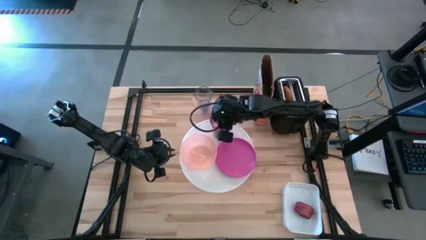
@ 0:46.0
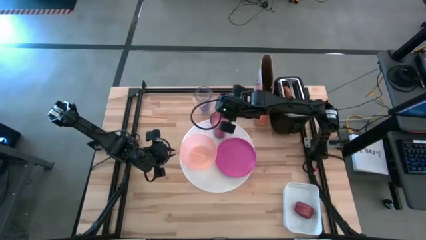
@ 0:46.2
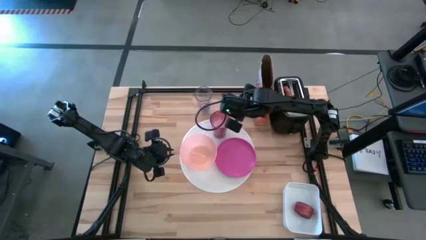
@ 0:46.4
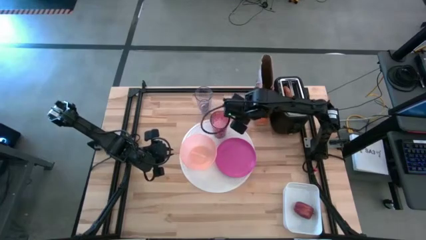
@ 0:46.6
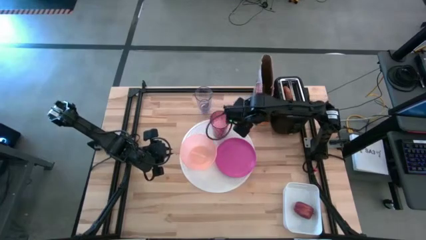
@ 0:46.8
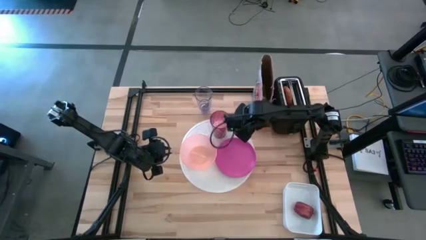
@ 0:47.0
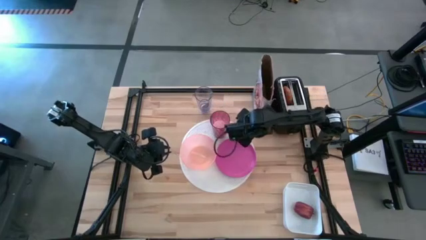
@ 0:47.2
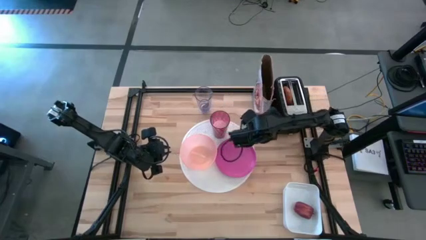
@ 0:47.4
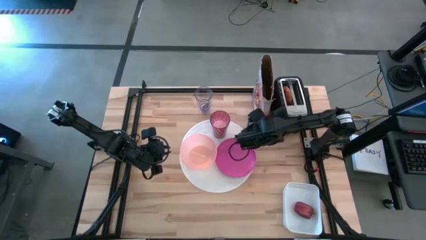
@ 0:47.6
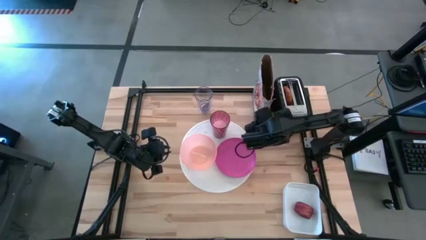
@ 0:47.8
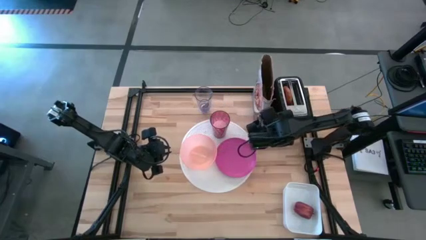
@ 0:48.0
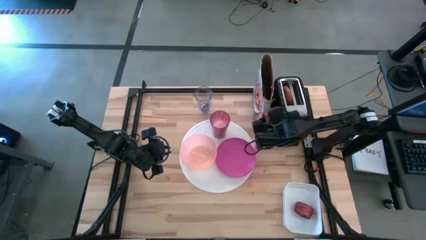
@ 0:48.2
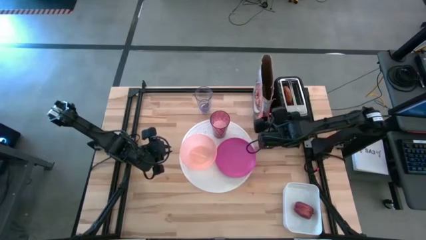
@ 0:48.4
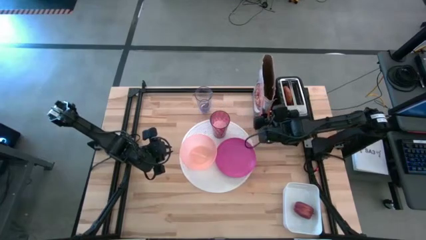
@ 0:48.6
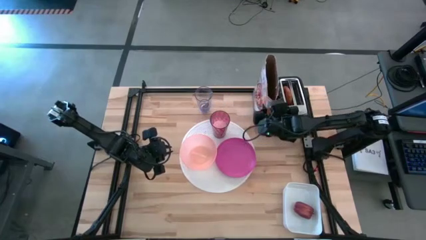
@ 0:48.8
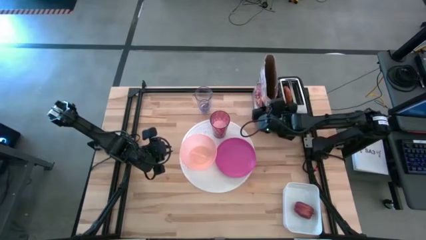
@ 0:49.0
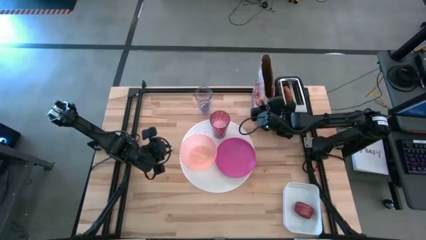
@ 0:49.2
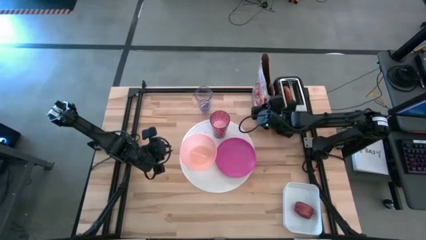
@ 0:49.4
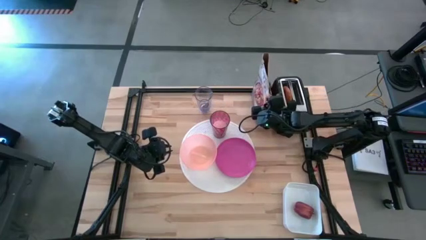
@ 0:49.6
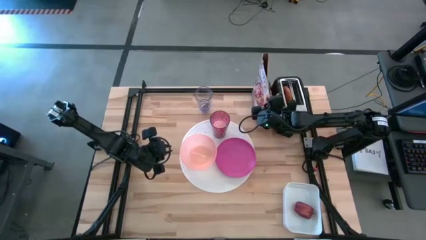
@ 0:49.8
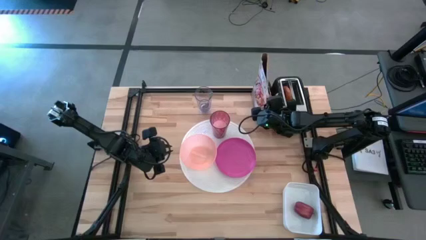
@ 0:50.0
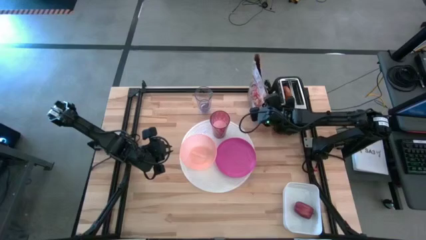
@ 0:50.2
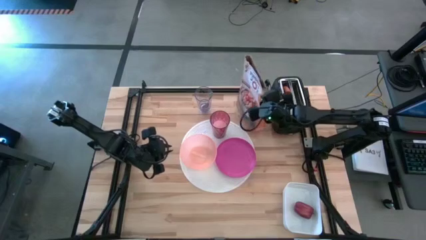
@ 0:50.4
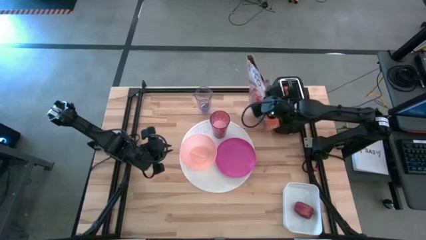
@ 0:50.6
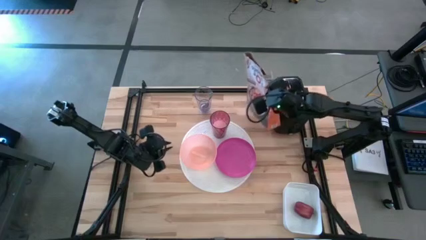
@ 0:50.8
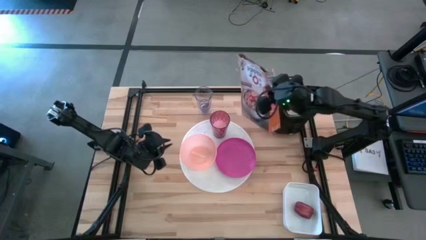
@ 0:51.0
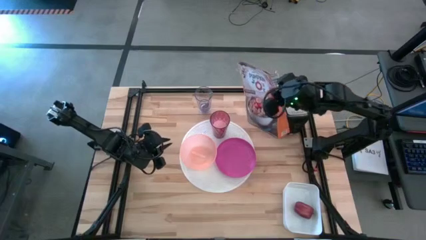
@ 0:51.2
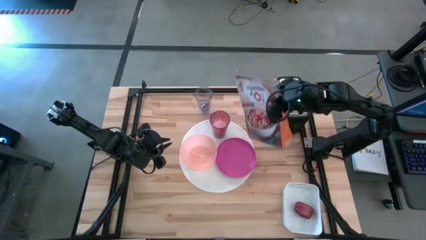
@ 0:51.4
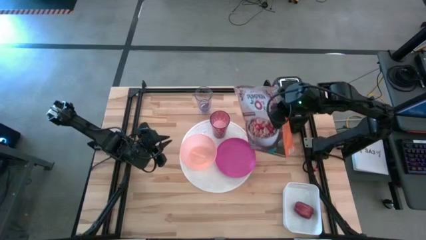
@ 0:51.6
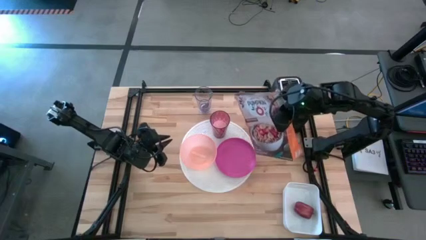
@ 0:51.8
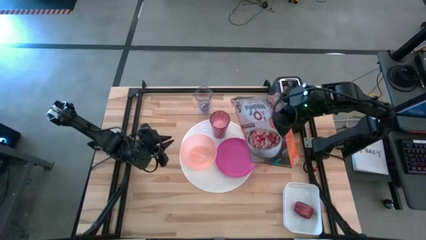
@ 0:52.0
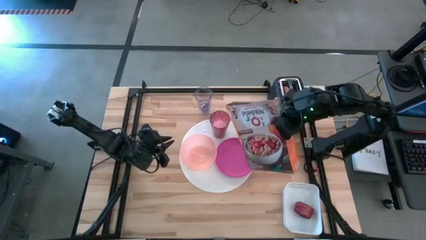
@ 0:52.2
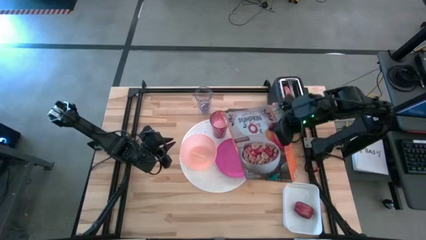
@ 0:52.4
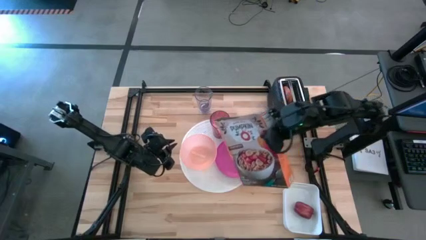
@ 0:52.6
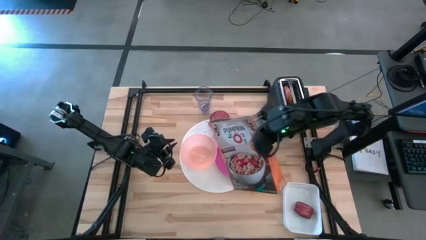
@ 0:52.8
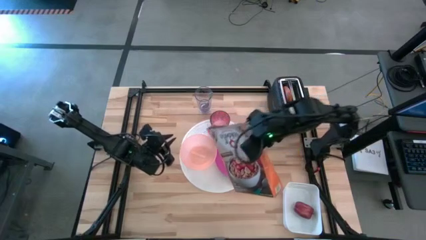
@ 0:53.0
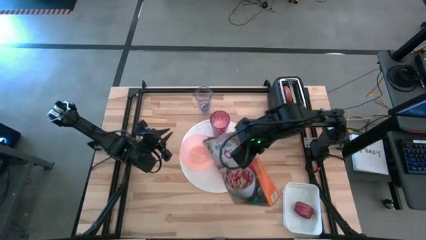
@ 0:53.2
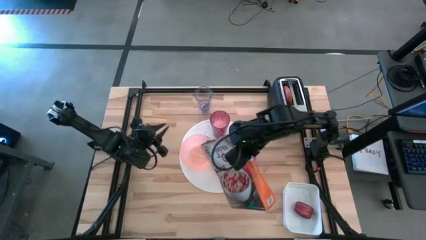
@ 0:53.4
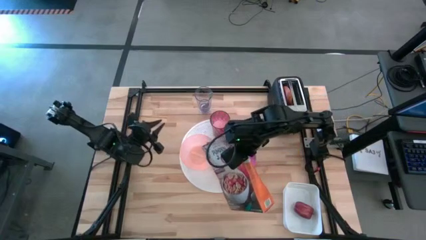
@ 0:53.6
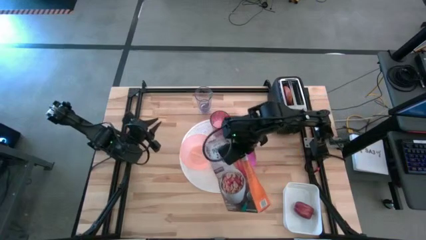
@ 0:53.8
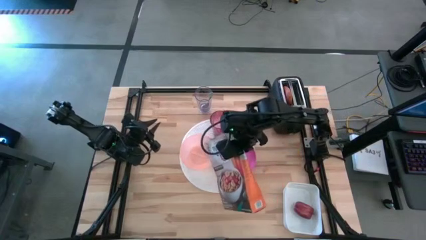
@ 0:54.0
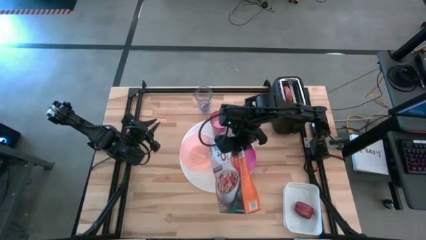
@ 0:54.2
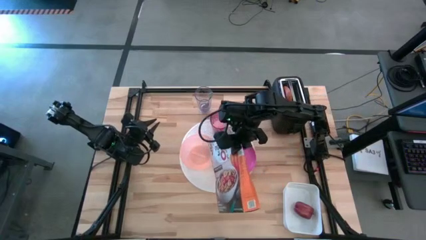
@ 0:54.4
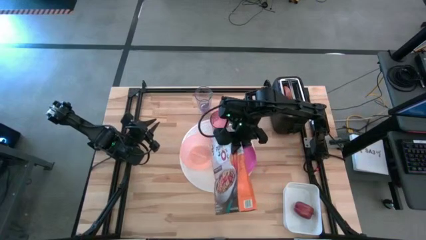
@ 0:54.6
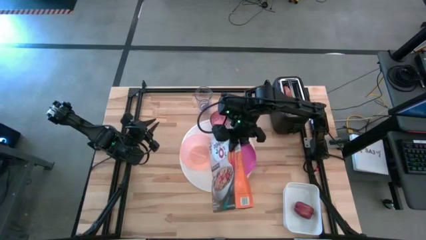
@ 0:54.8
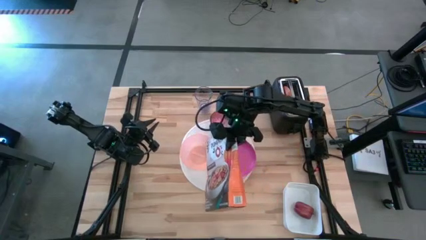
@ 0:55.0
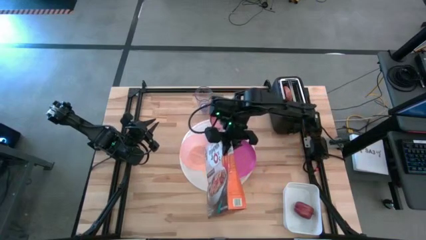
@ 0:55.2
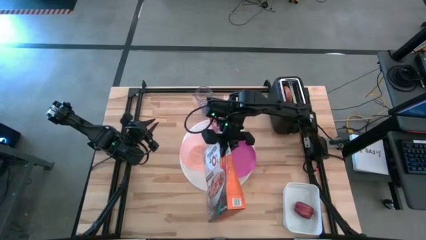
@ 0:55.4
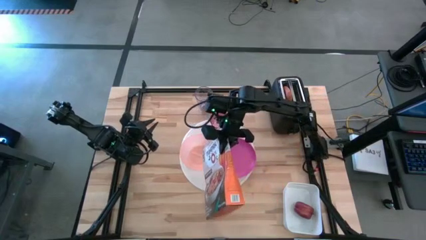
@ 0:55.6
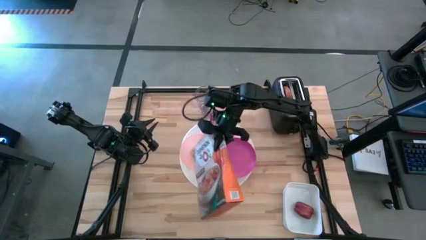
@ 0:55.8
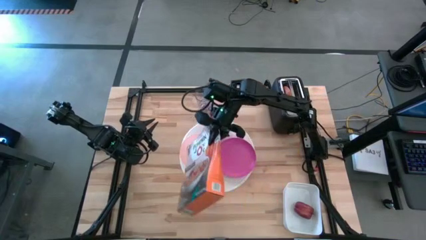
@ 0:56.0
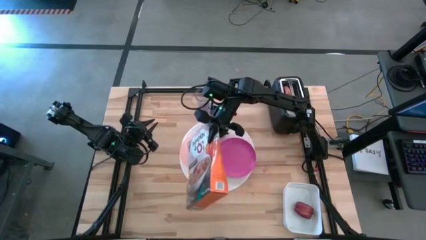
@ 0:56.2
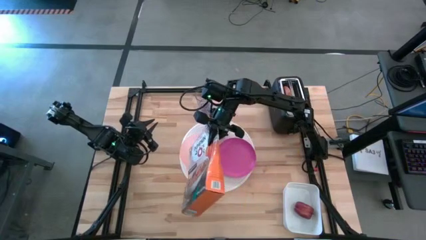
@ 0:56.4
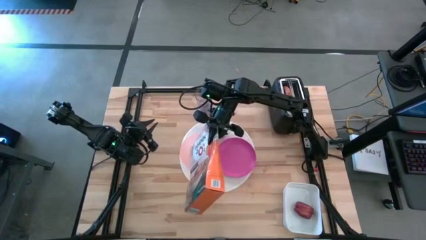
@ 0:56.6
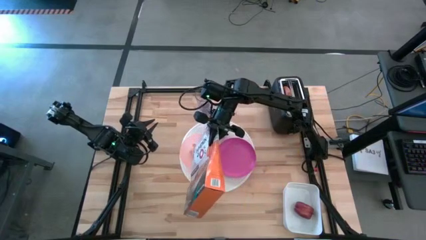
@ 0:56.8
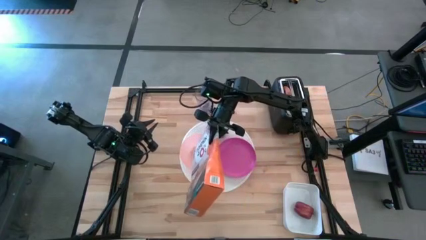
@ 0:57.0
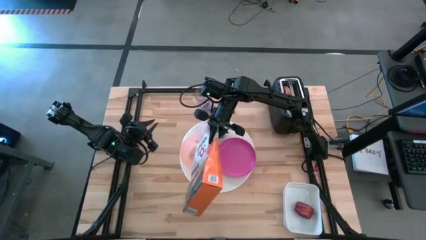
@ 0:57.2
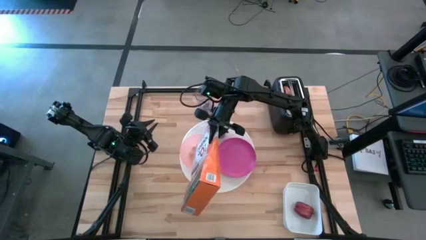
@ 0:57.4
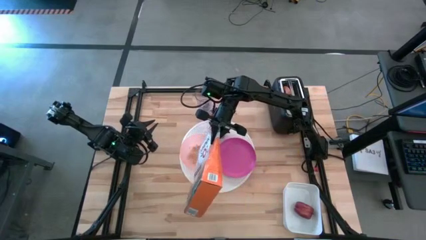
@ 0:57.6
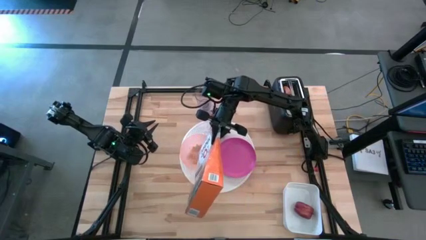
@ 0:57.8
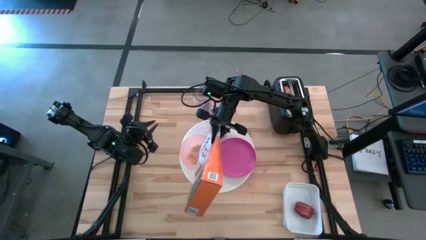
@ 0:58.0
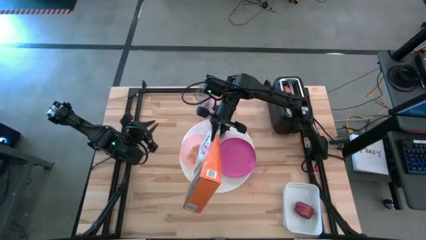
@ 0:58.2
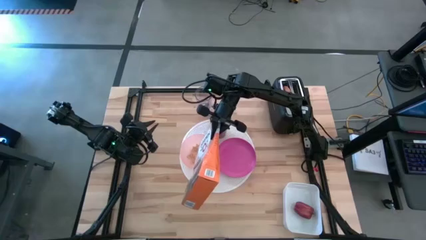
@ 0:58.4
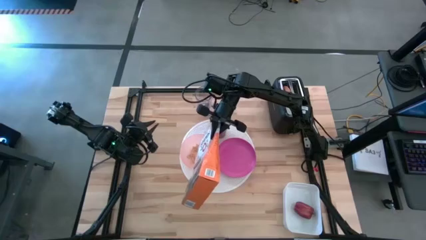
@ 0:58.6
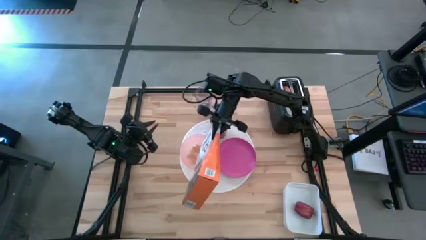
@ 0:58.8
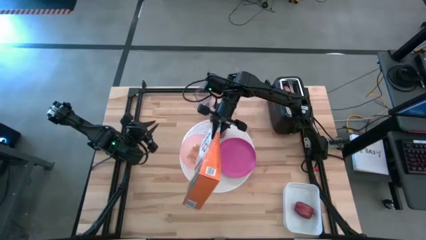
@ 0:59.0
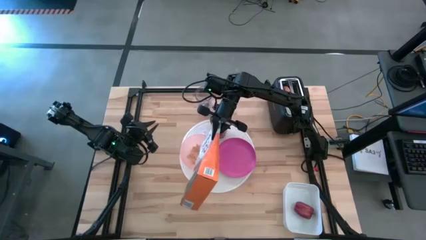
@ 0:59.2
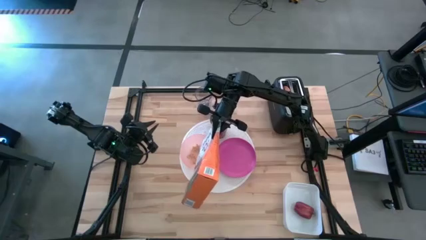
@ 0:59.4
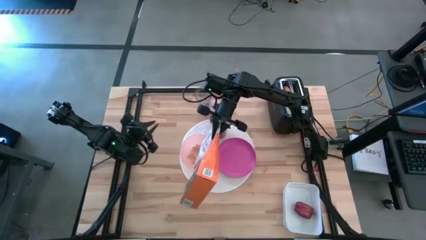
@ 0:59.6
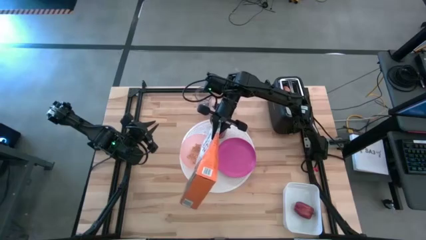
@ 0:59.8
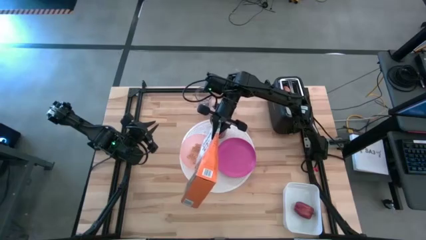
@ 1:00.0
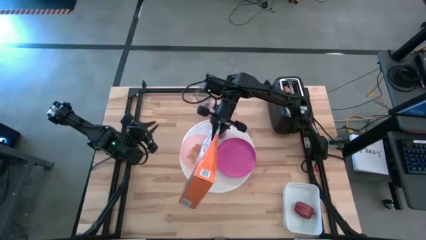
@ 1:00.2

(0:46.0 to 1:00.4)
Task: Arrange a breakfast setting
Pour the cereal into the orange bowl
